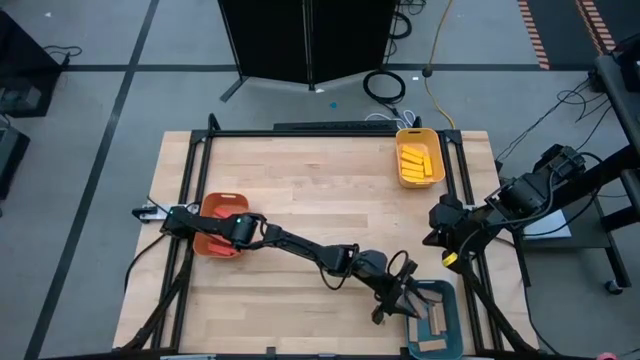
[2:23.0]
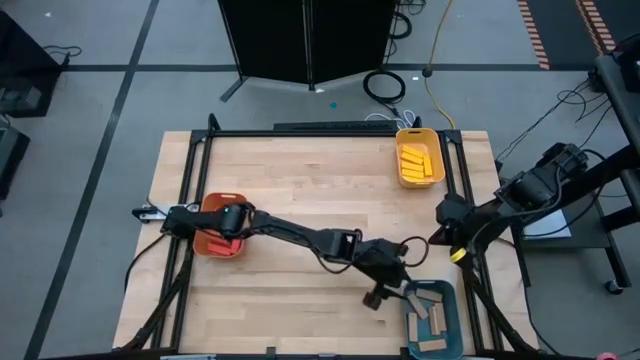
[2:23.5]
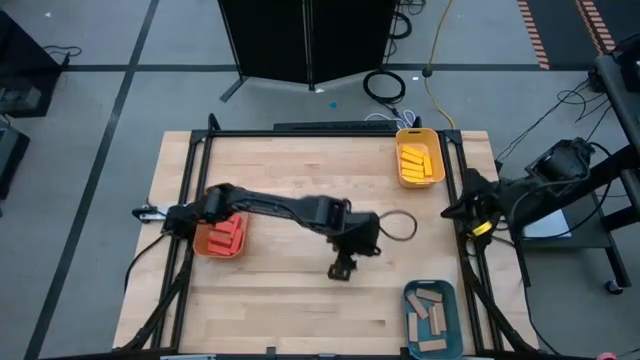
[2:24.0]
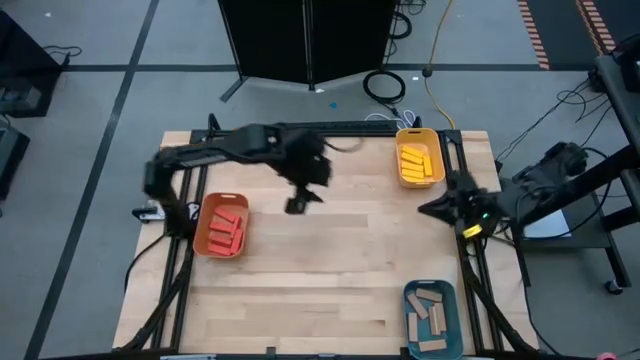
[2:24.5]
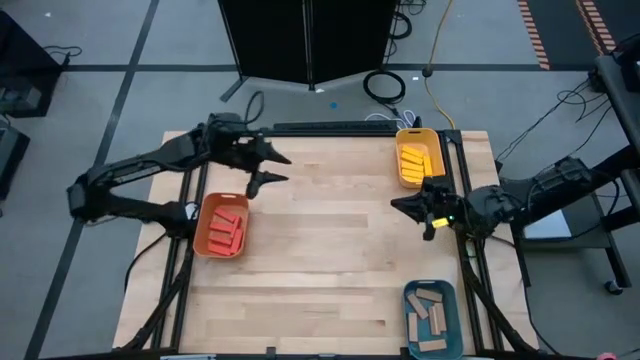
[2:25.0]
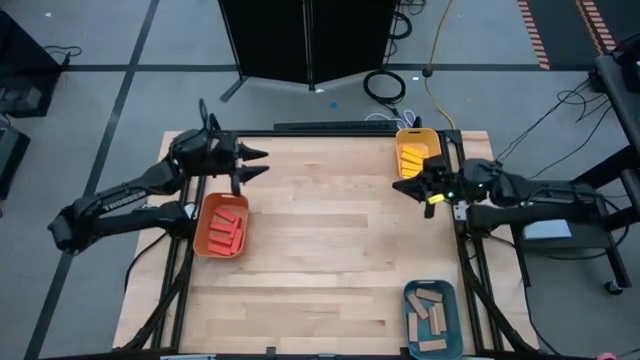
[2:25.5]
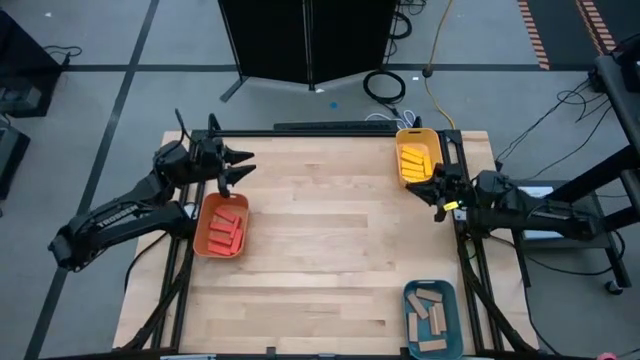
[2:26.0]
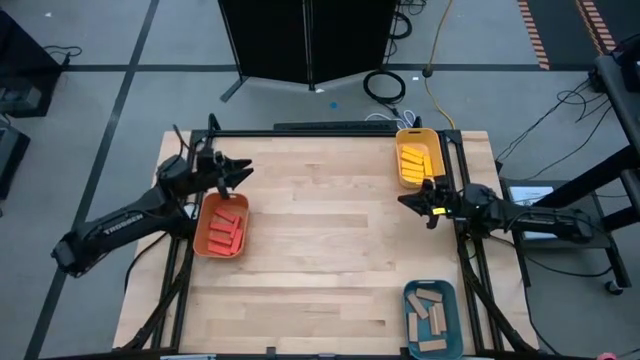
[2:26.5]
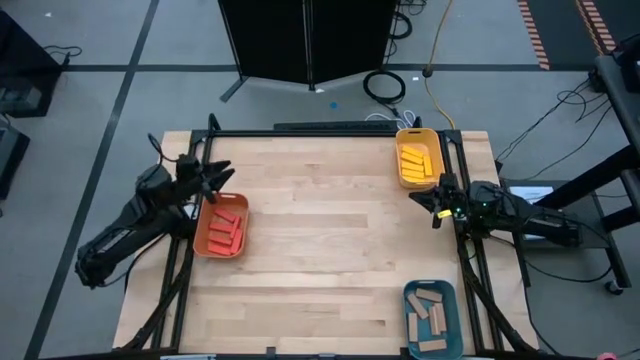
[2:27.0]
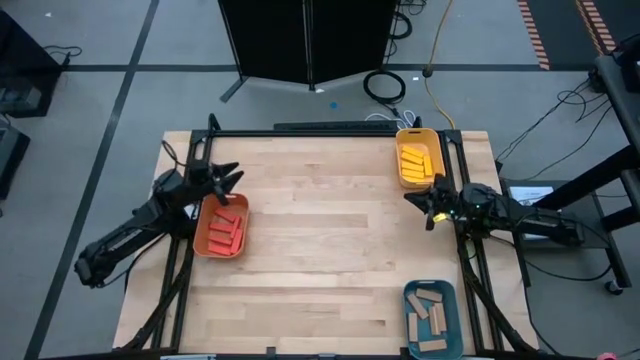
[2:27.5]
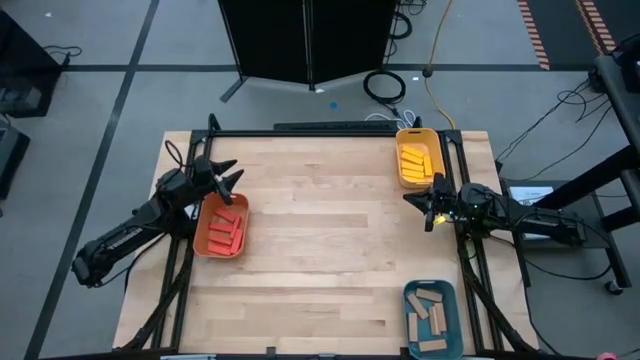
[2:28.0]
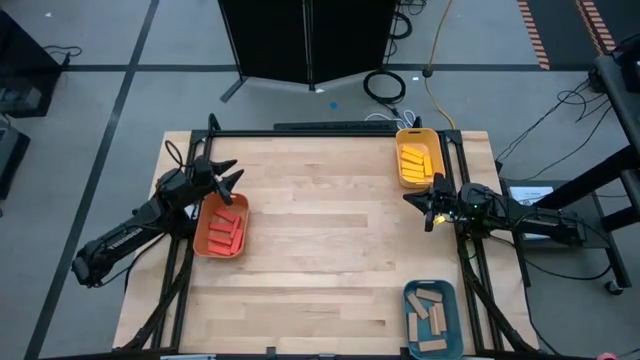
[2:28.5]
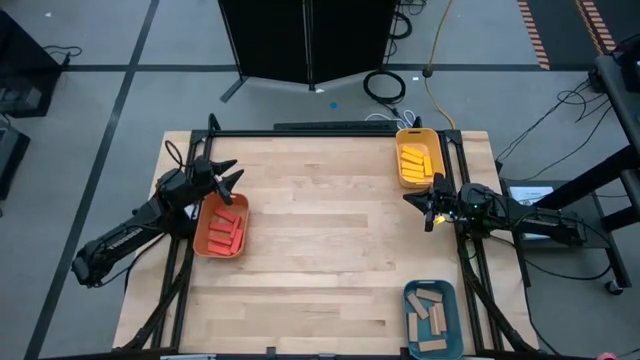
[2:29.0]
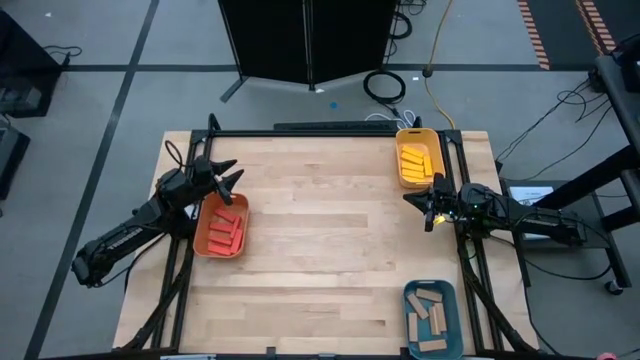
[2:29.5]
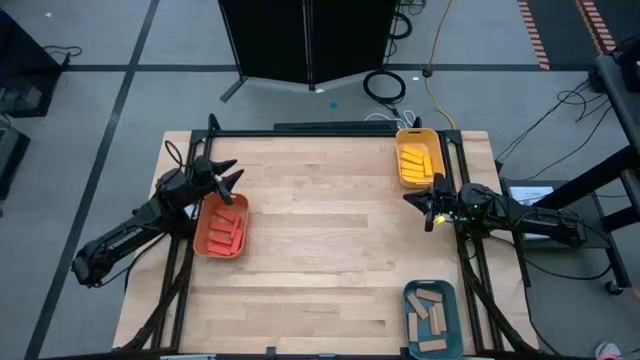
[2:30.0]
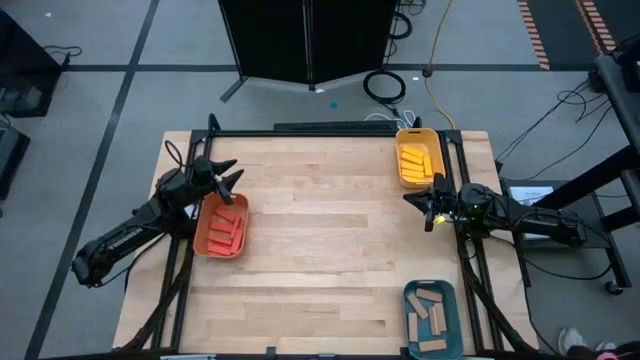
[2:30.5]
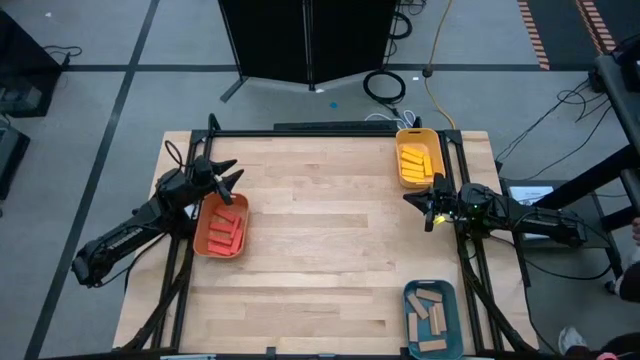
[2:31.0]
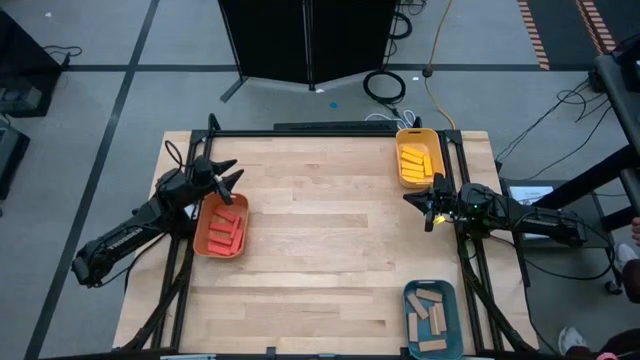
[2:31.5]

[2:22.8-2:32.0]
Task: Sort blocks
Return to Home Position

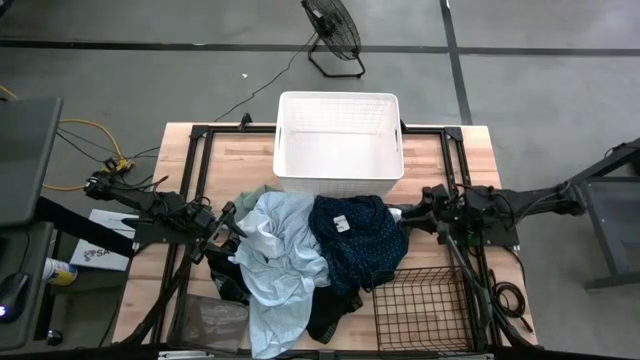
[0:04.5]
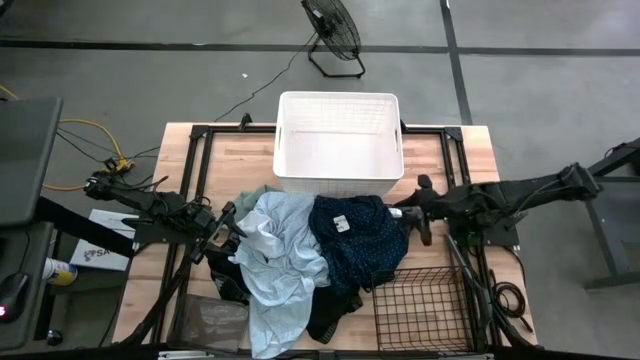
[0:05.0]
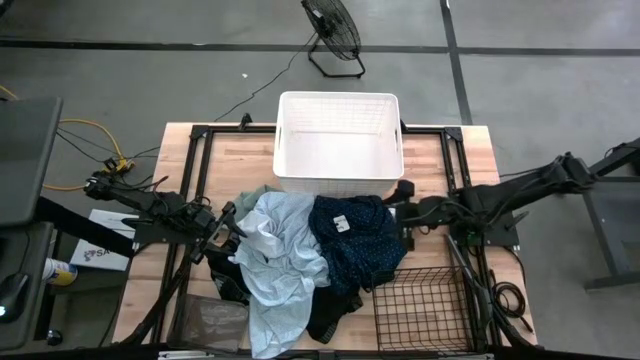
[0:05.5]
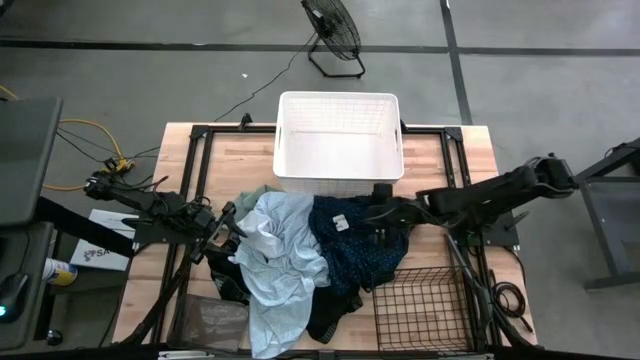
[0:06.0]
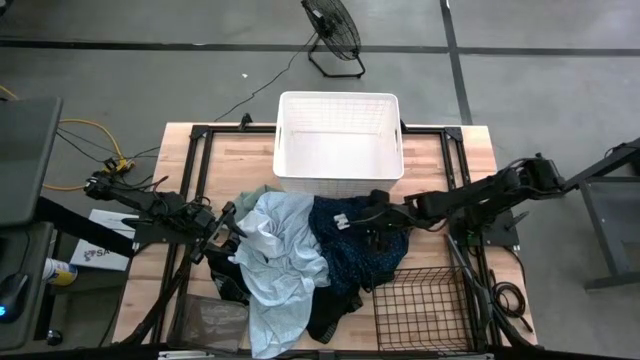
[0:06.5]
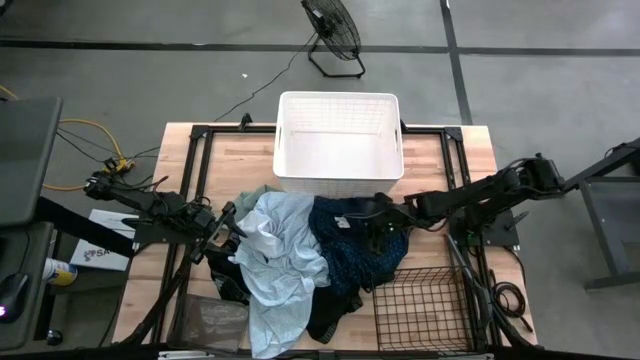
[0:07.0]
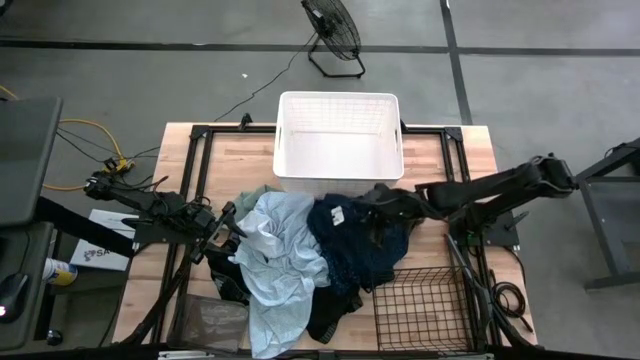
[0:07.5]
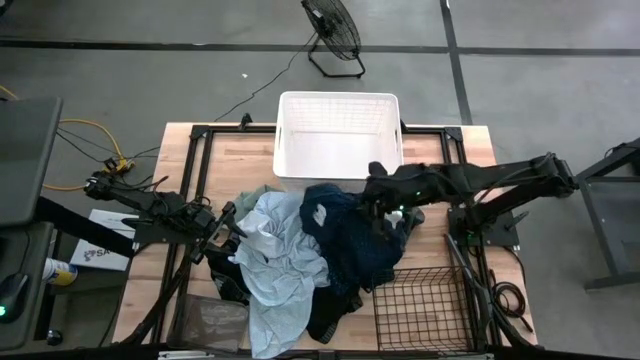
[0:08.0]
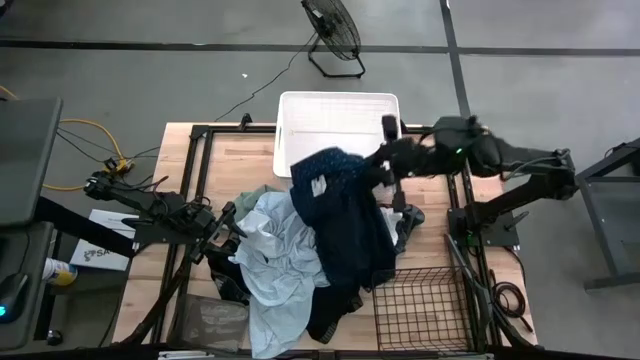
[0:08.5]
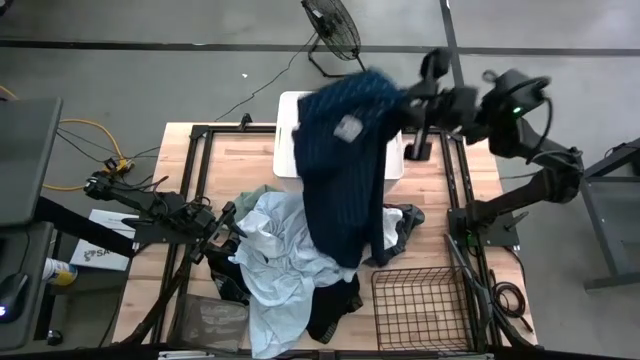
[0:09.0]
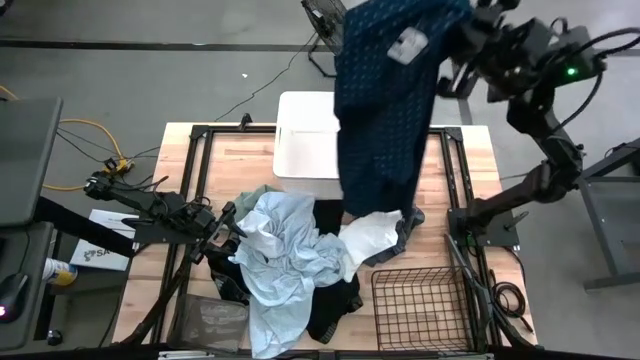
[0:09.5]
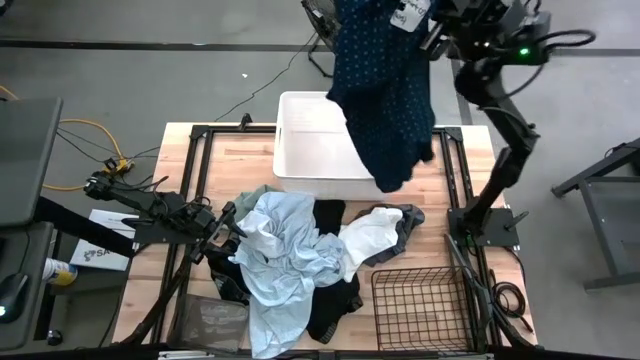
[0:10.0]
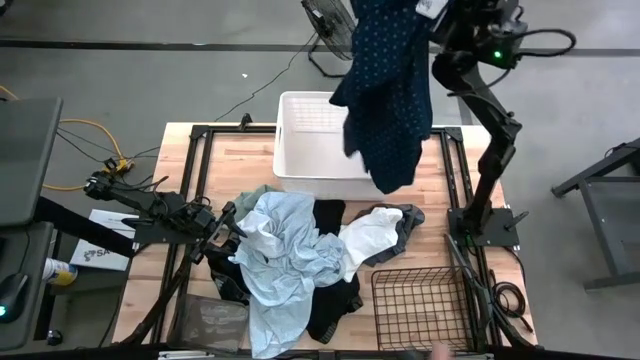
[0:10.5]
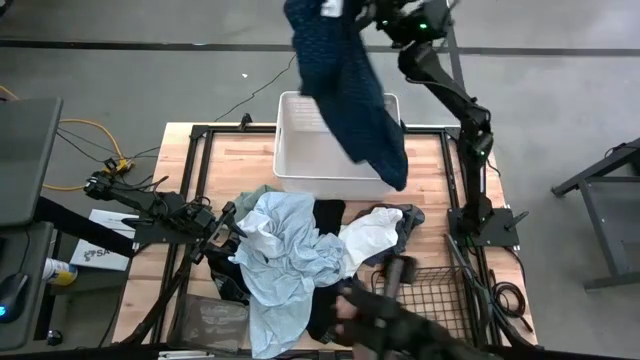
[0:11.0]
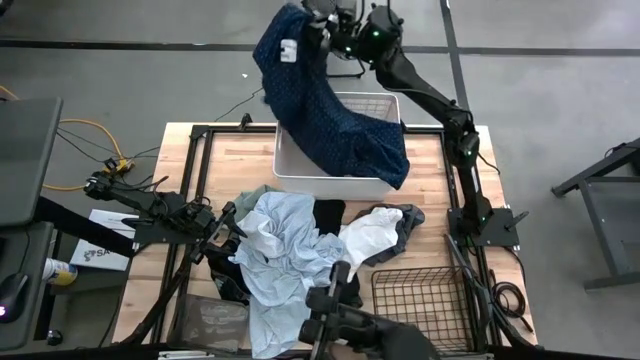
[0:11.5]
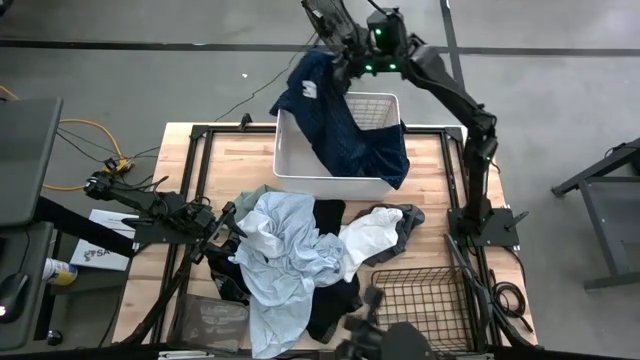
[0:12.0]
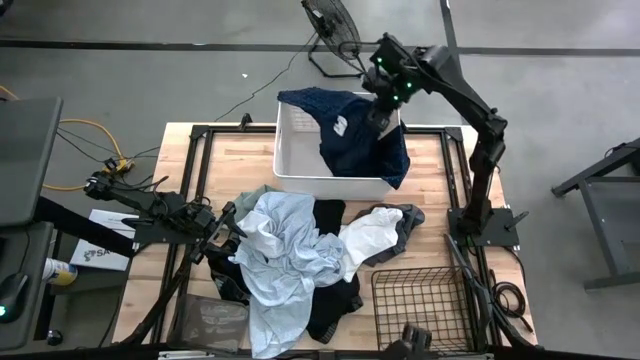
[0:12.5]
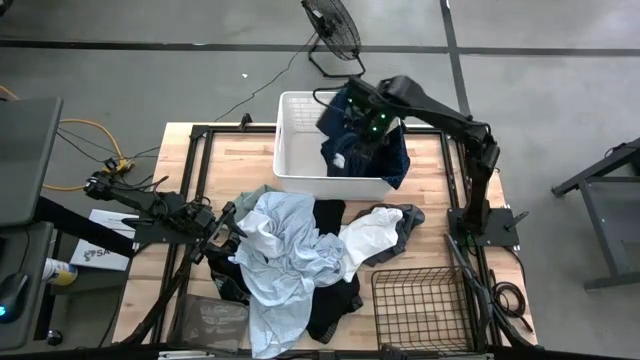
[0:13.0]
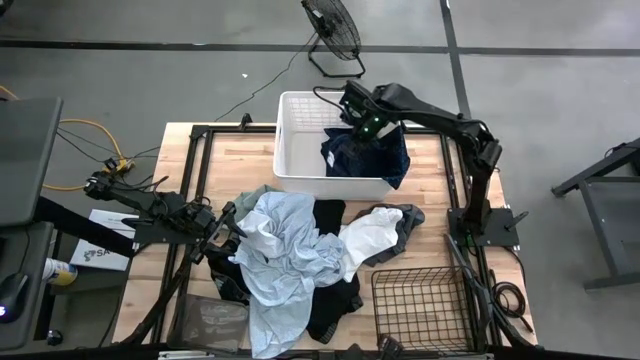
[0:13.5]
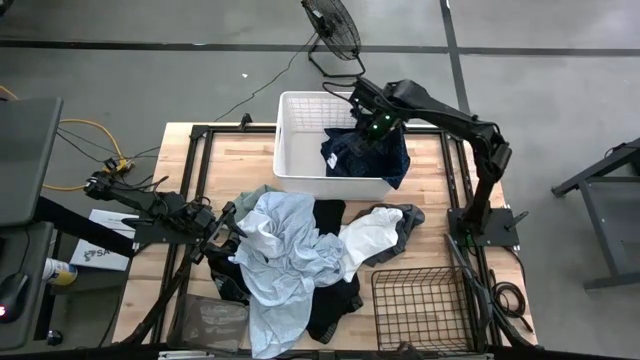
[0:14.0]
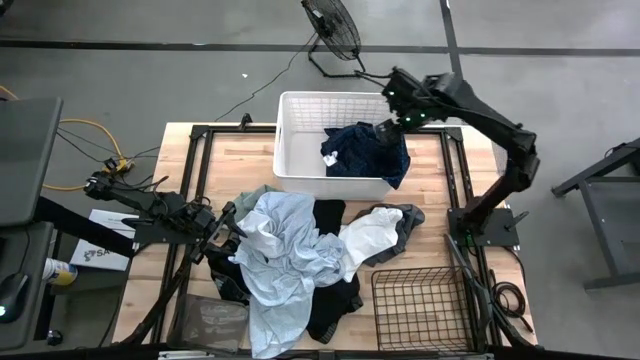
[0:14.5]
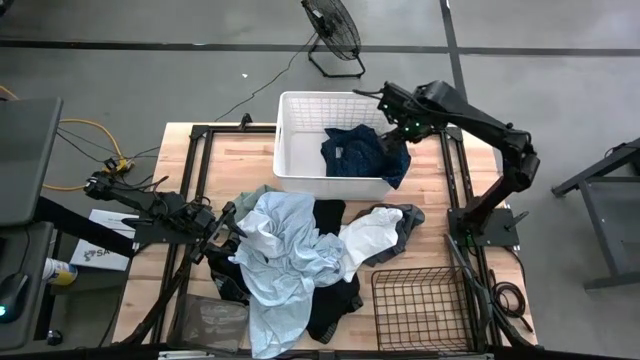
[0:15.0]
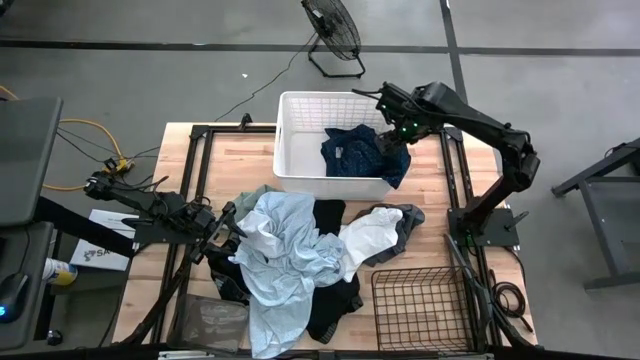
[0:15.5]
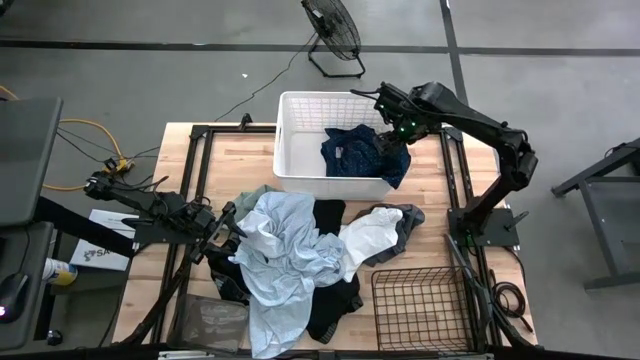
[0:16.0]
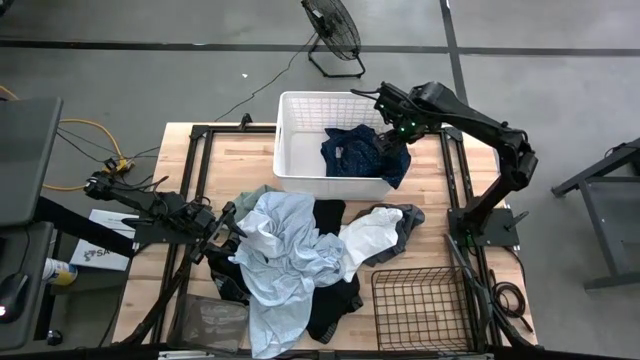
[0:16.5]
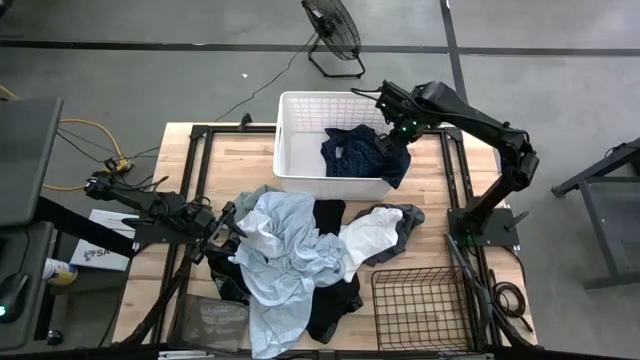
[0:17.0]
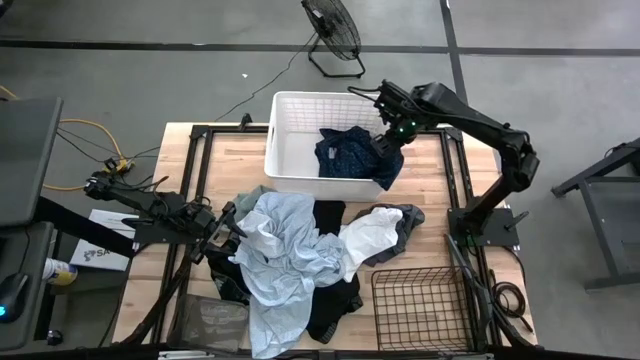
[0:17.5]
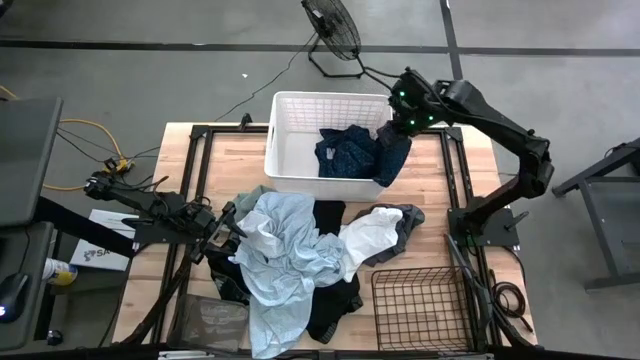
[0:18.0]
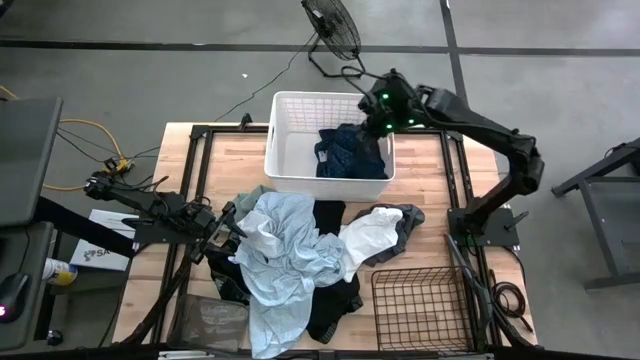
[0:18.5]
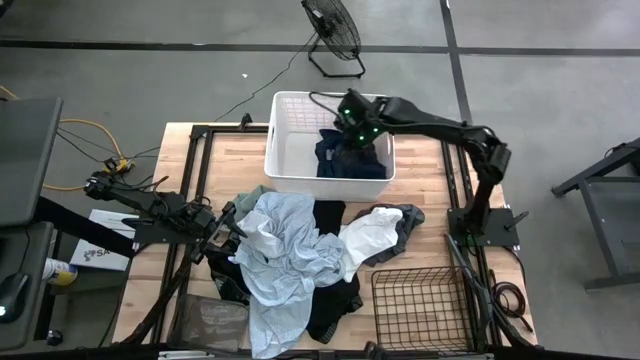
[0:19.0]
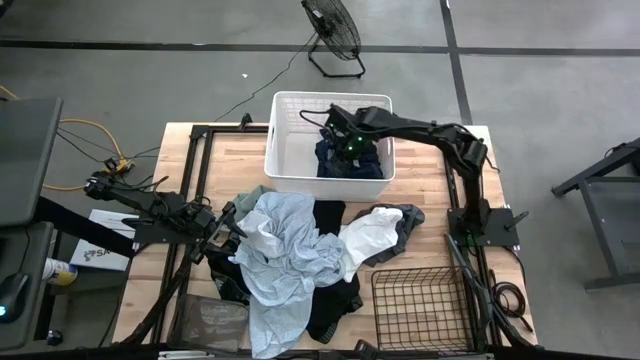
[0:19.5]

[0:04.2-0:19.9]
Task: Pick & Place Cloths
Put the dark blue polo shirt into the white laundry bin
